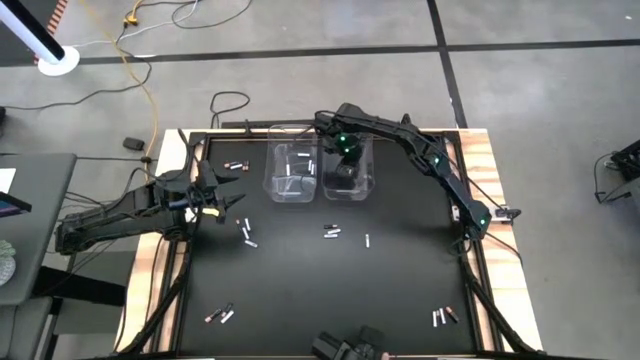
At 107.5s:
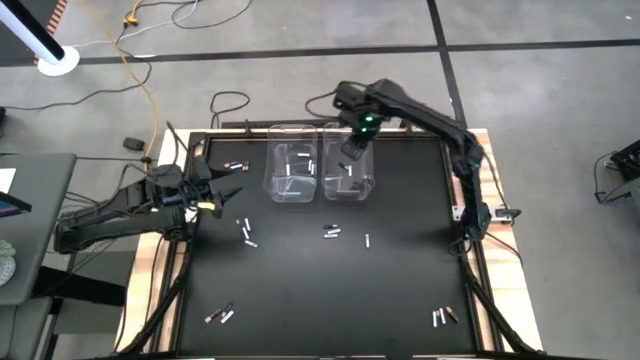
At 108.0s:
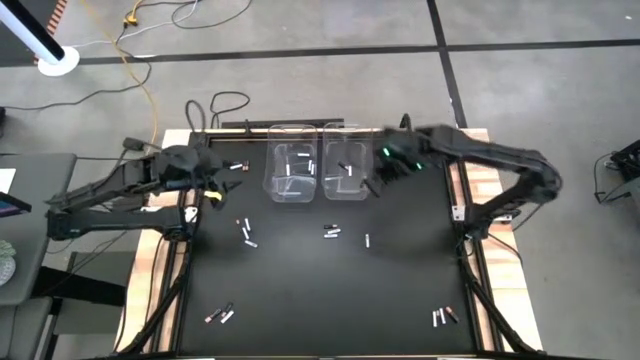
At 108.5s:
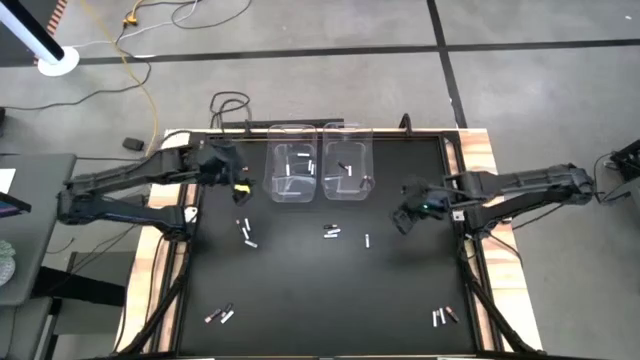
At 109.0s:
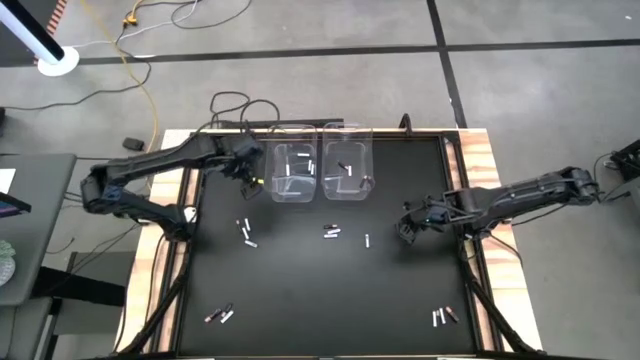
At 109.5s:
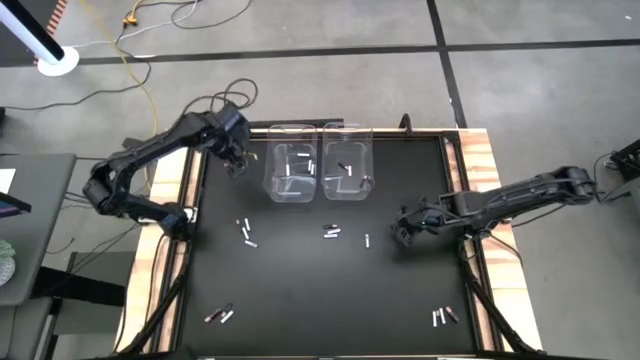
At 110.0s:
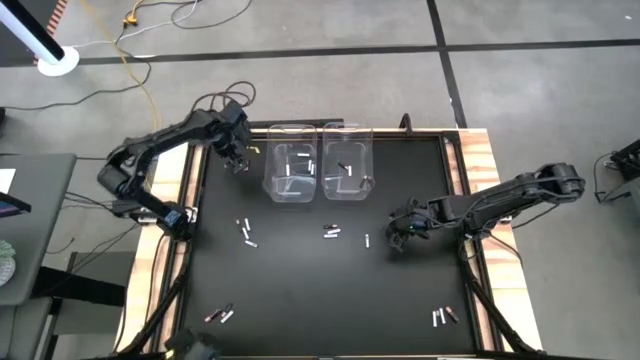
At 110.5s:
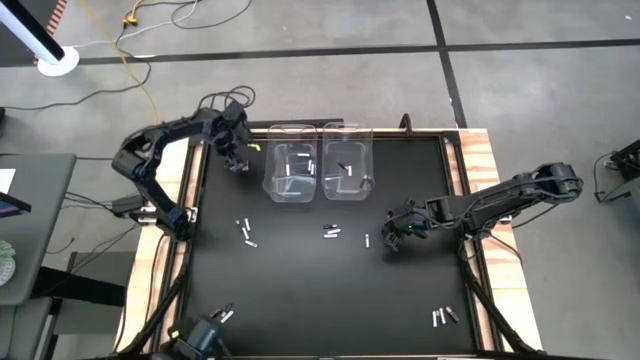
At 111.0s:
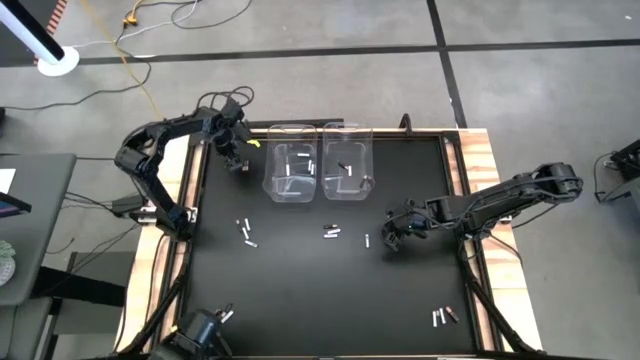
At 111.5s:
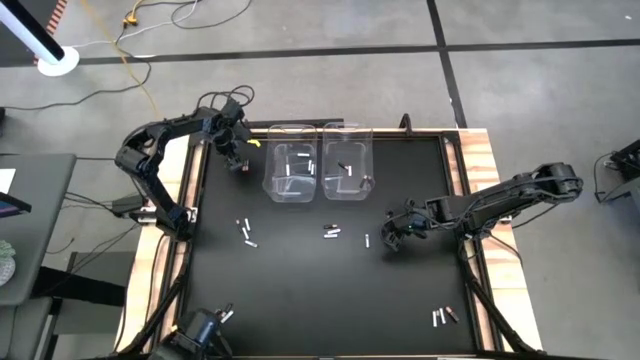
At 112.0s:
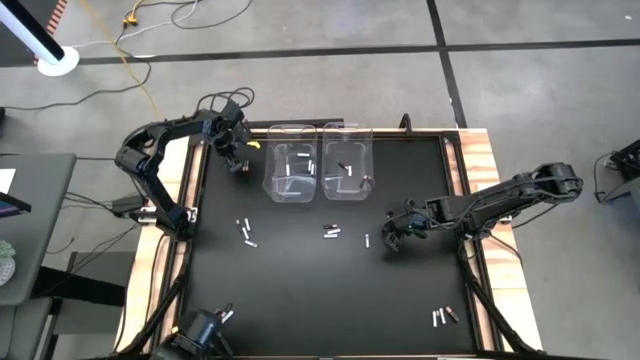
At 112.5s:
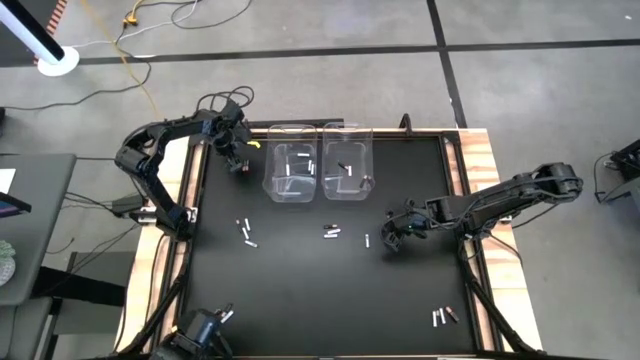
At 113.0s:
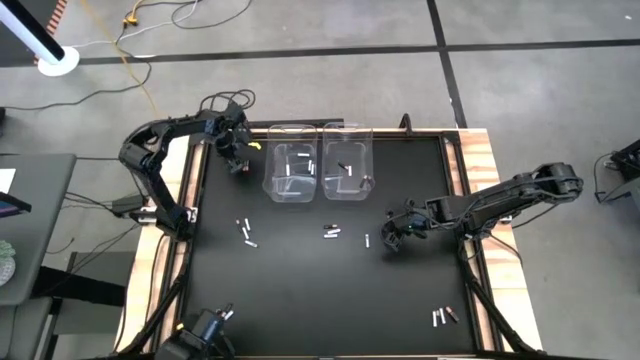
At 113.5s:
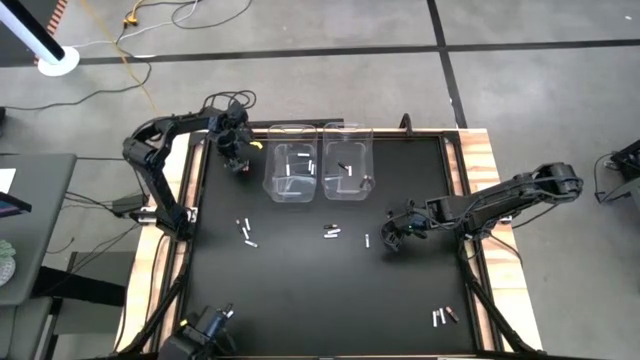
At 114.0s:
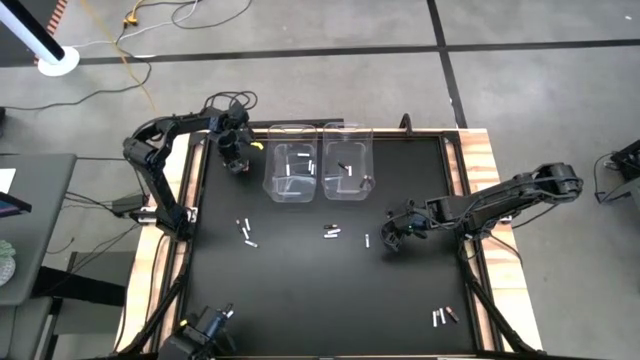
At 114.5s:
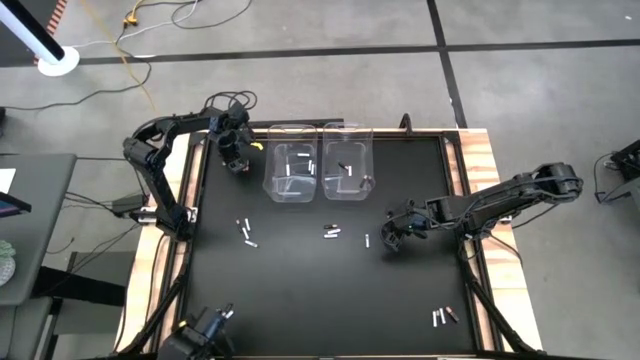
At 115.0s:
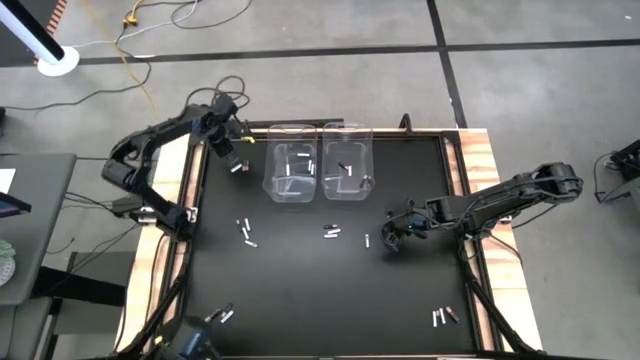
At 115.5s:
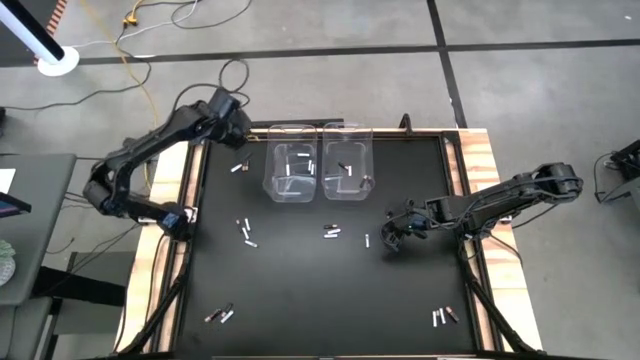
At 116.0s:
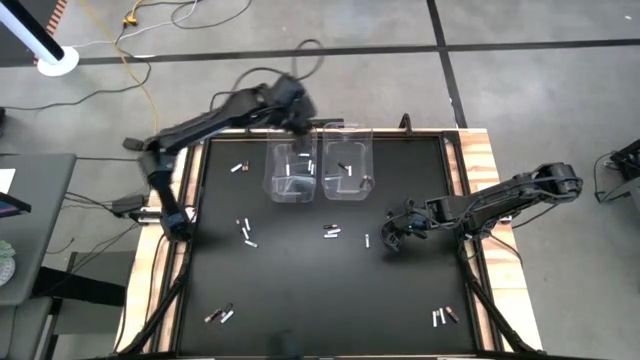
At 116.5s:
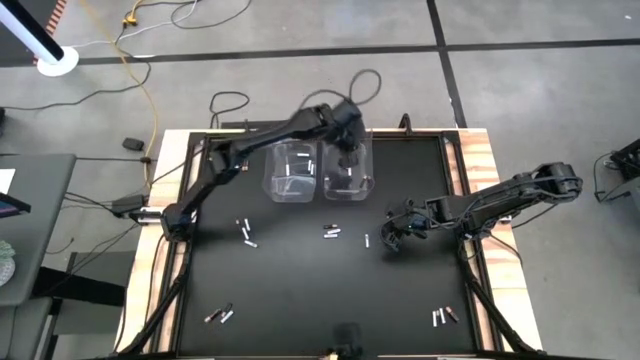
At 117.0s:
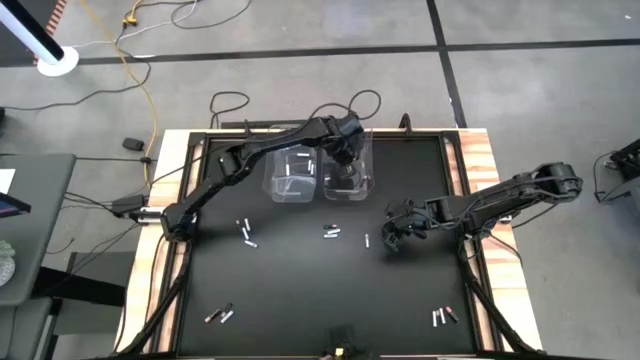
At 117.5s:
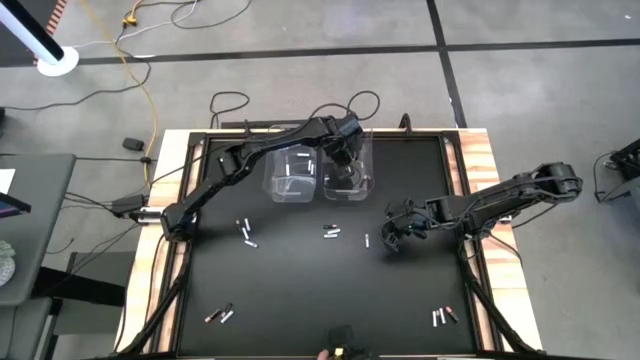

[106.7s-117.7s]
Task: Sort batteries
Put the black battery into the right transparent bin

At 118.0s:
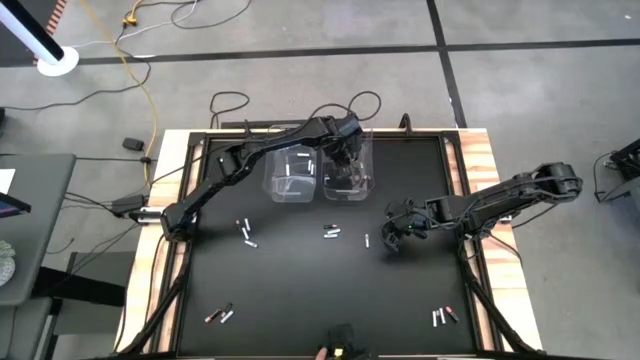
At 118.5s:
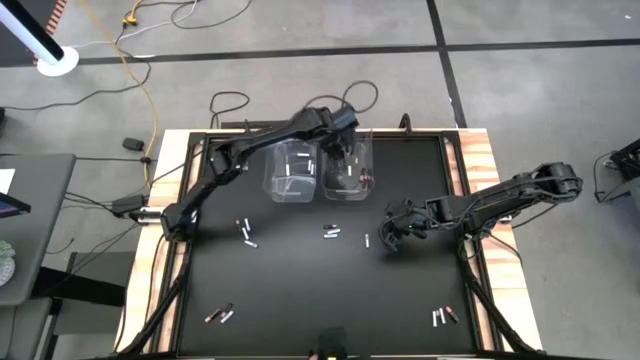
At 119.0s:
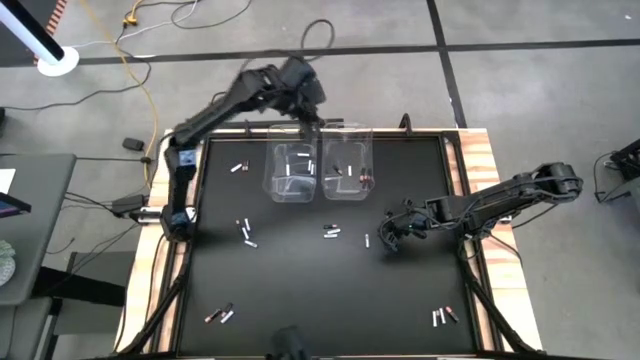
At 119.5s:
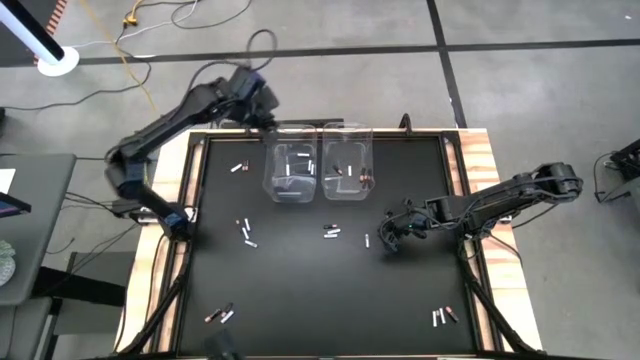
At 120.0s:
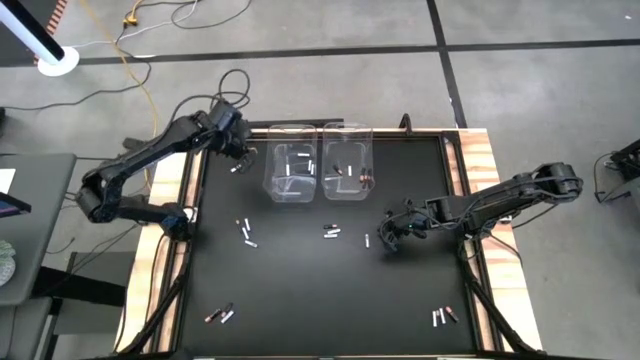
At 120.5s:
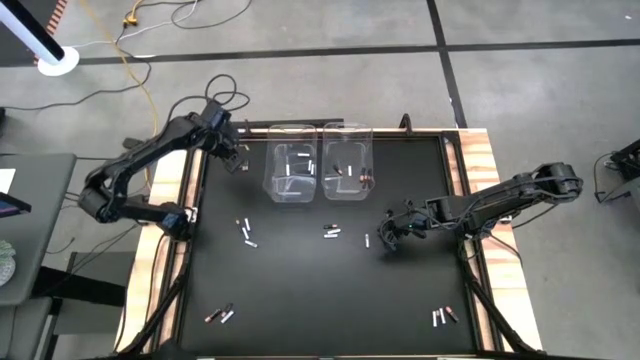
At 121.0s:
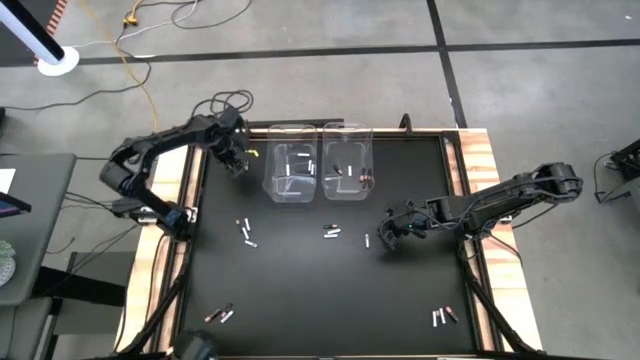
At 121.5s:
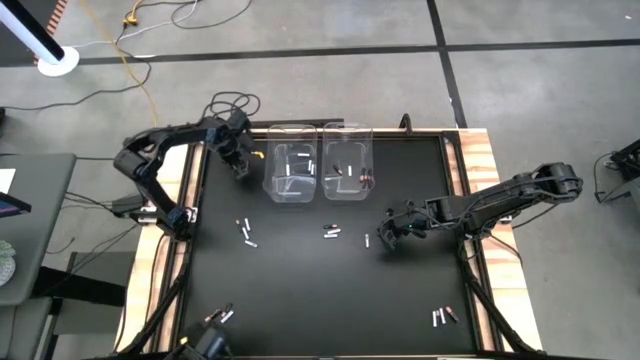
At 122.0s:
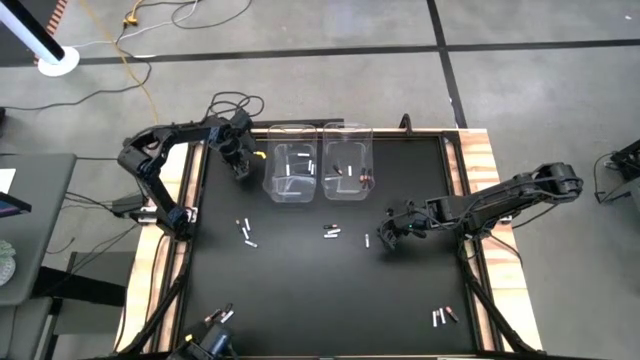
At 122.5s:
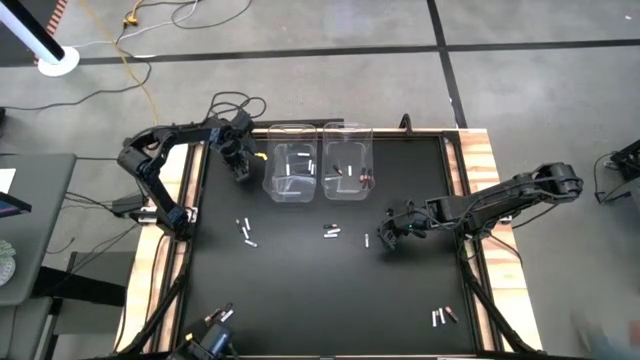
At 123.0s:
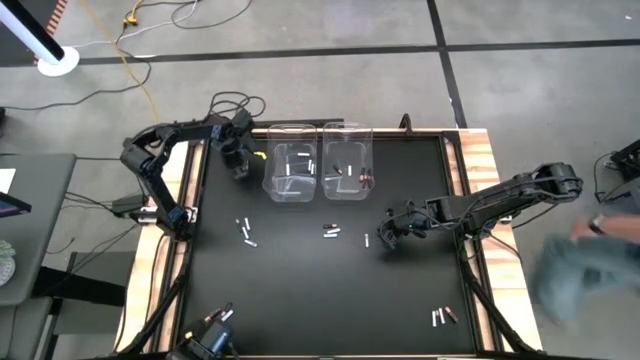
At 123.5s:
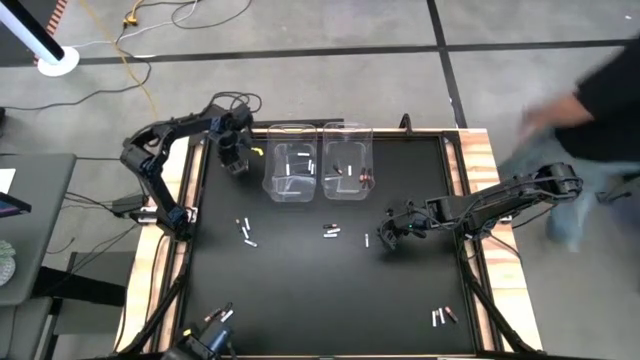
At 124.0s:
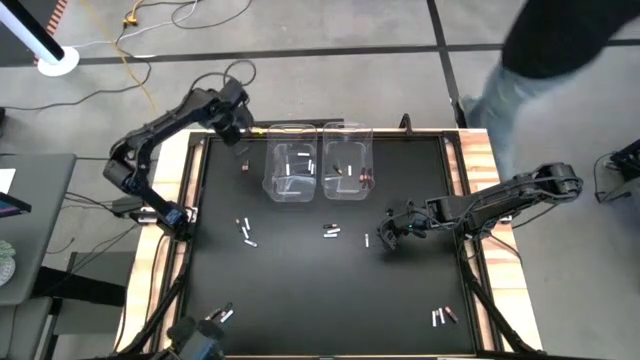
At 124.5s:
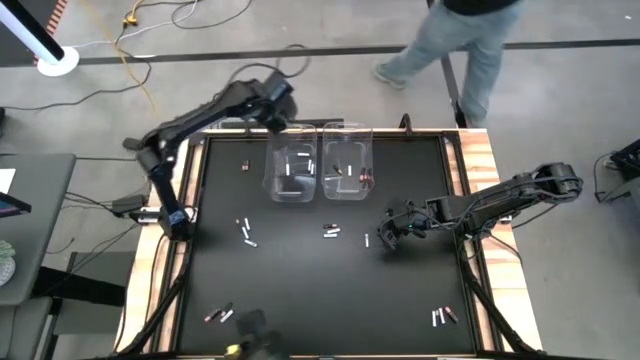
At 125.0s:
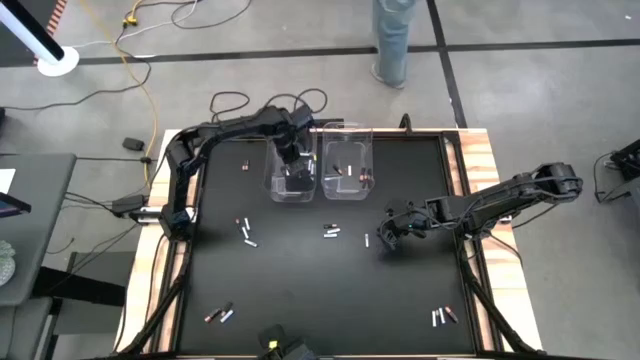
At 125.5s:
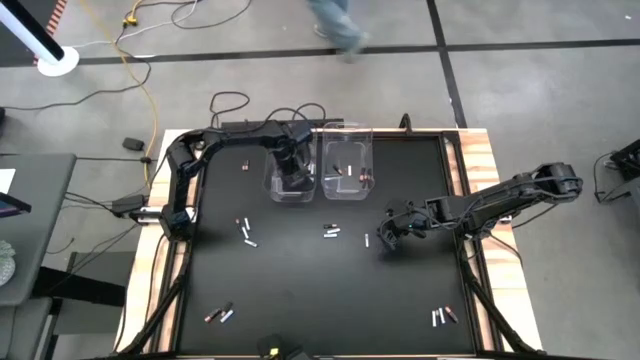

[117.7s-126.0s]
Put the white battery into the left transparent bin

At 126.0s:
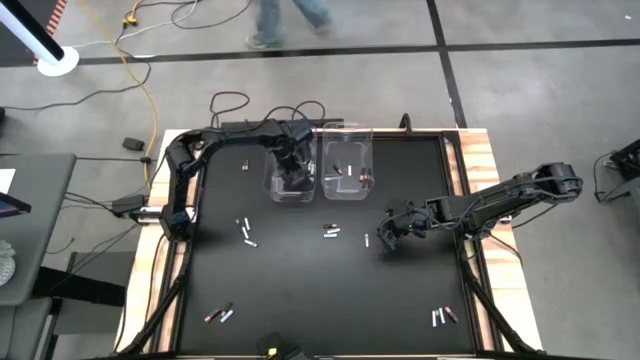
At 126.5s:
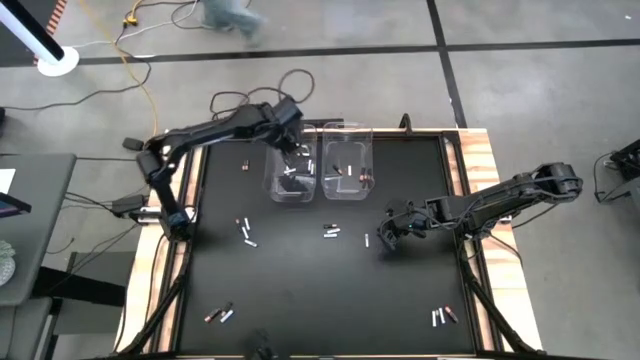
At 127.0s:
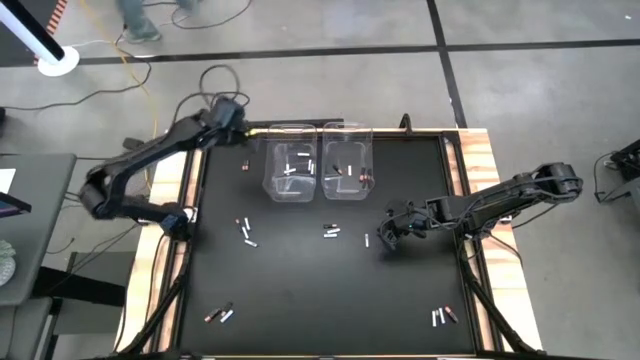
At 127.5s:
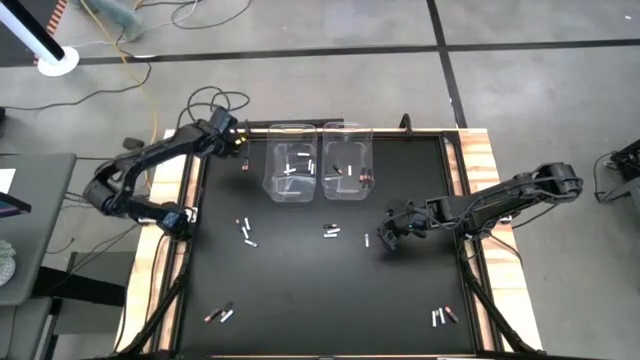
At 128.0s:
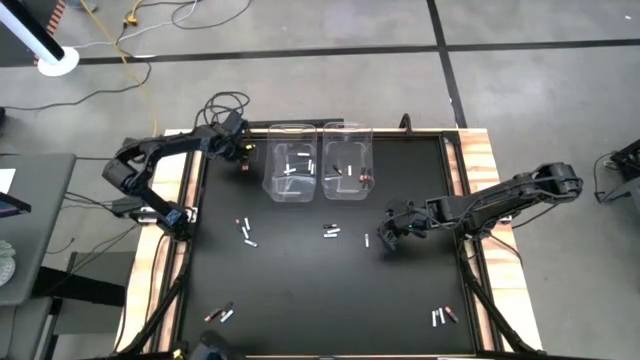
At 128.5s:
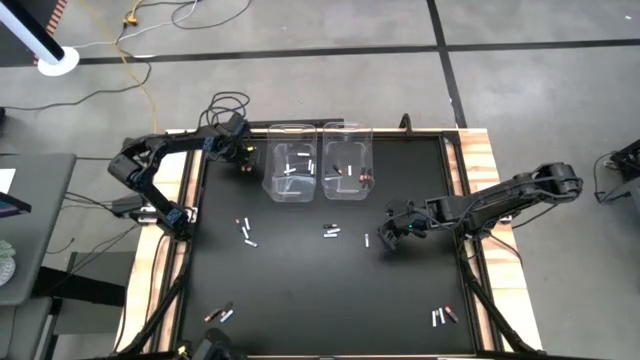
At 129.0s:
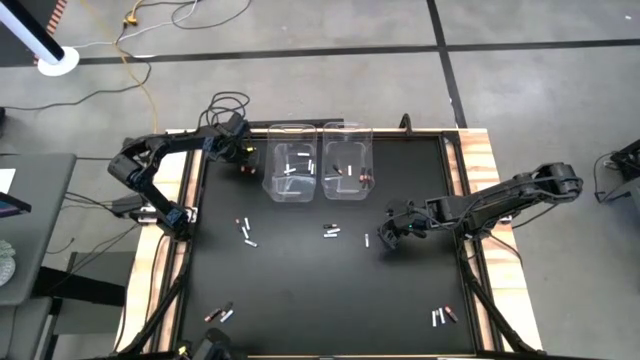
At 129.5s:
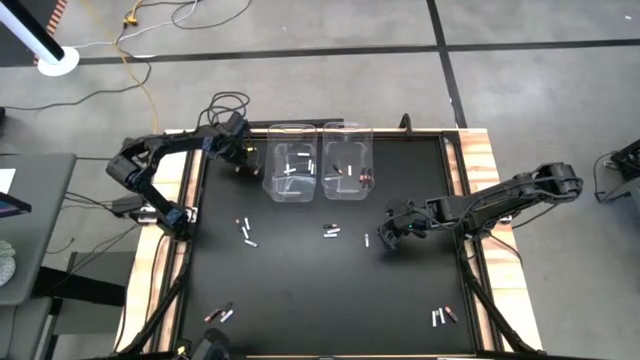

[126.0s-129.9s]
Put the black battery into the right transparent bin
